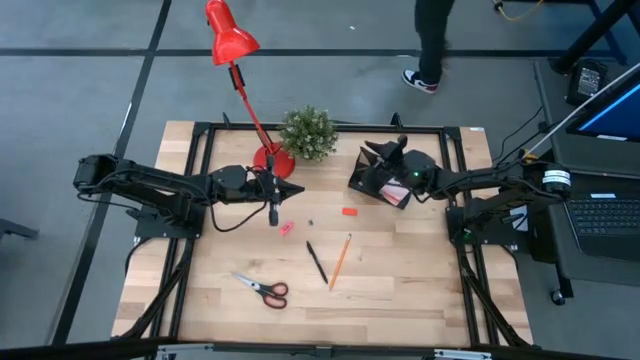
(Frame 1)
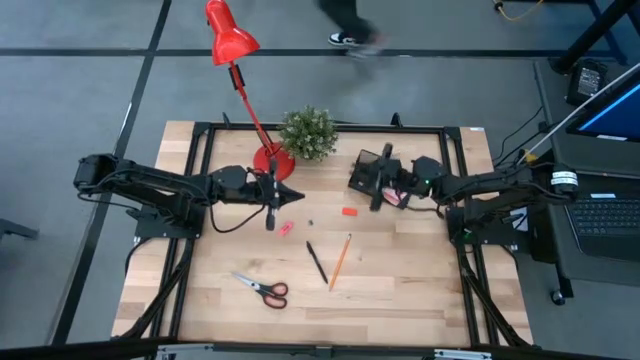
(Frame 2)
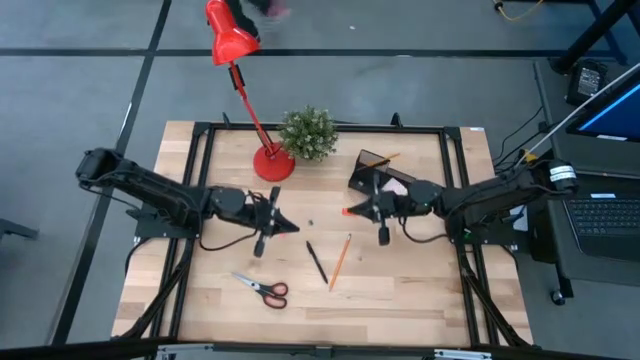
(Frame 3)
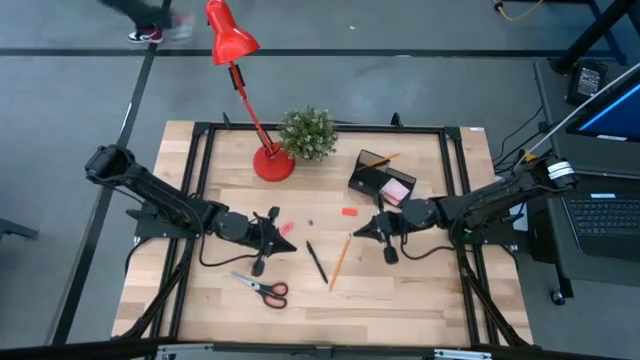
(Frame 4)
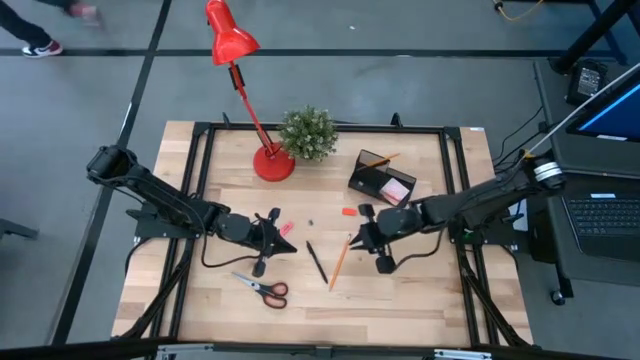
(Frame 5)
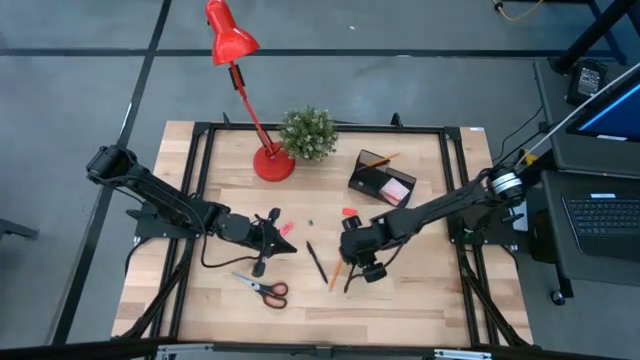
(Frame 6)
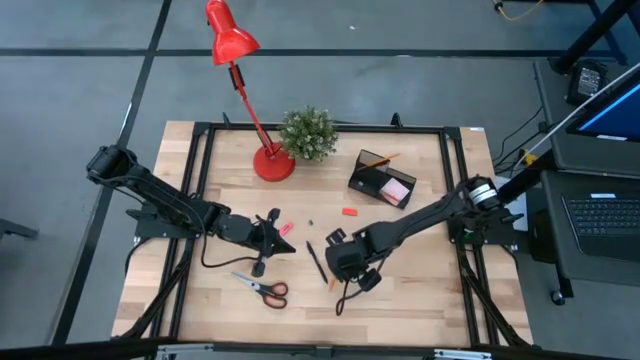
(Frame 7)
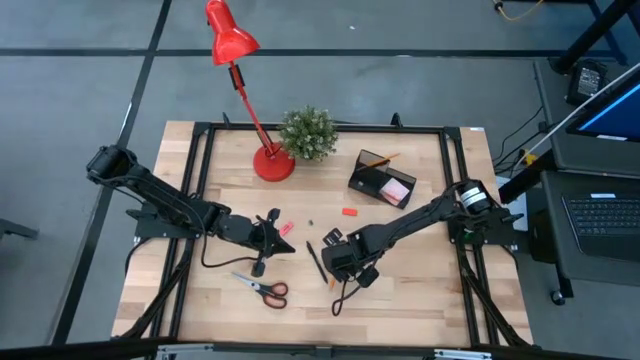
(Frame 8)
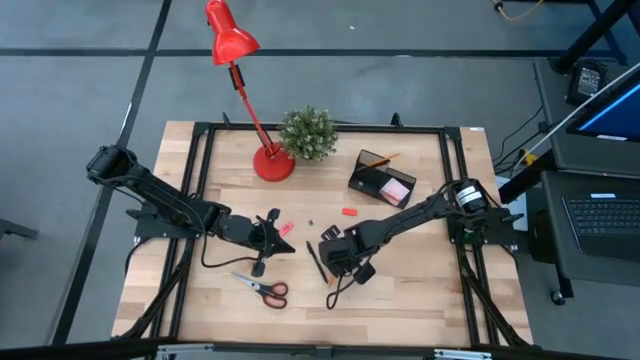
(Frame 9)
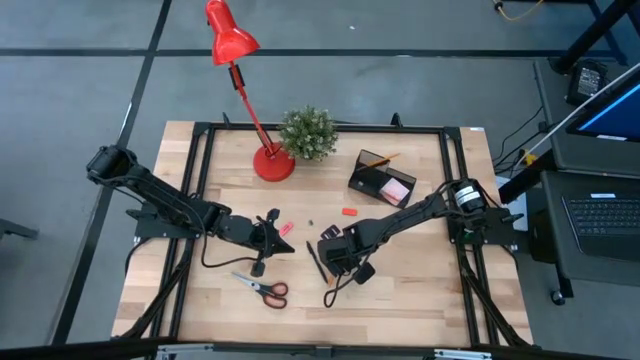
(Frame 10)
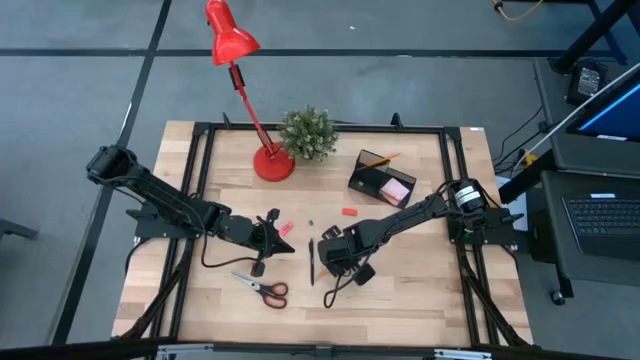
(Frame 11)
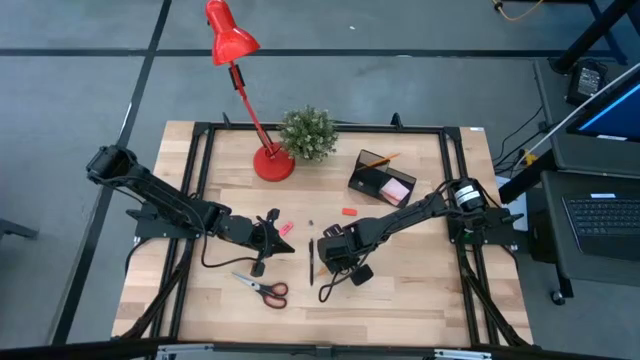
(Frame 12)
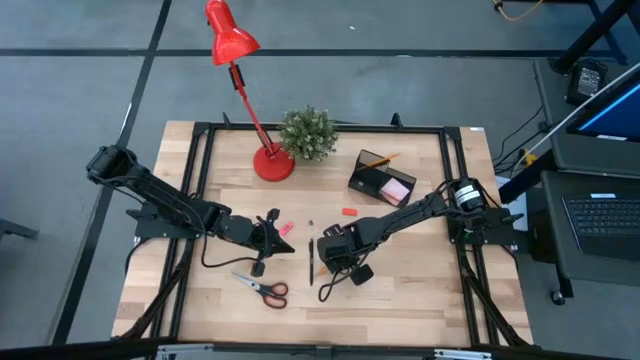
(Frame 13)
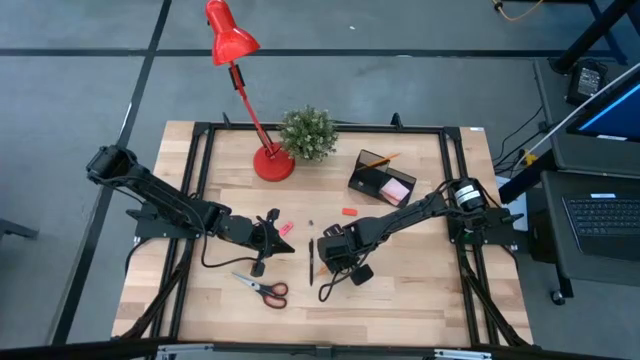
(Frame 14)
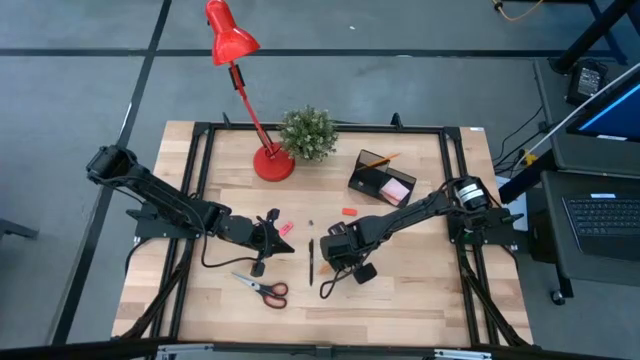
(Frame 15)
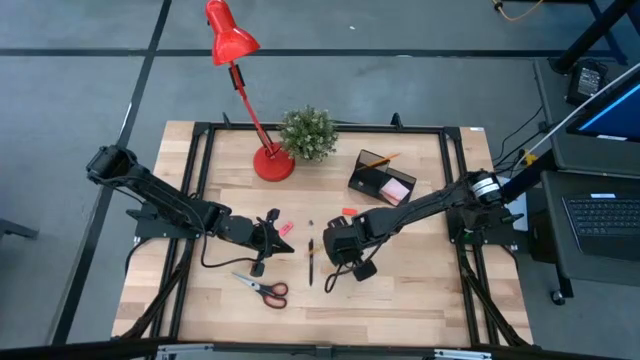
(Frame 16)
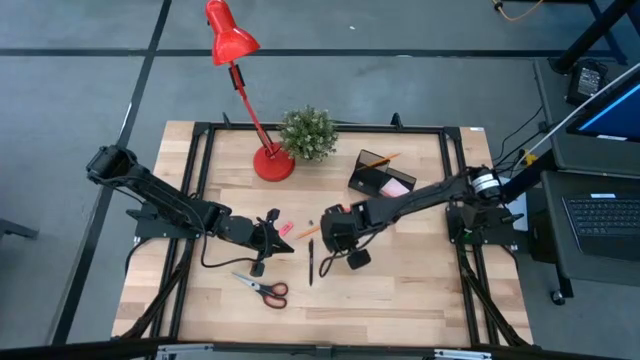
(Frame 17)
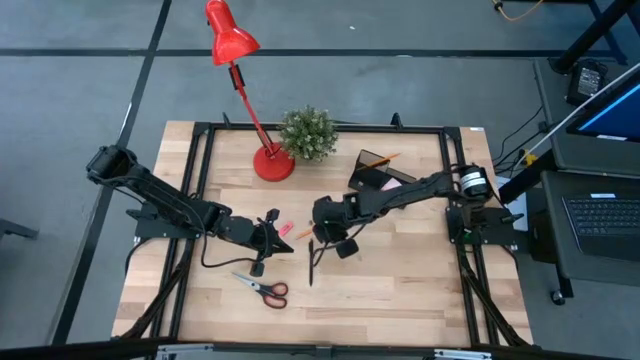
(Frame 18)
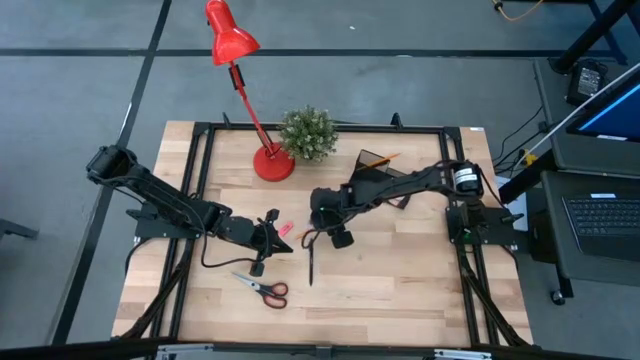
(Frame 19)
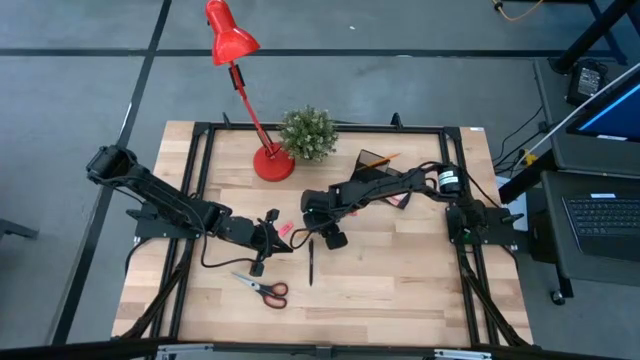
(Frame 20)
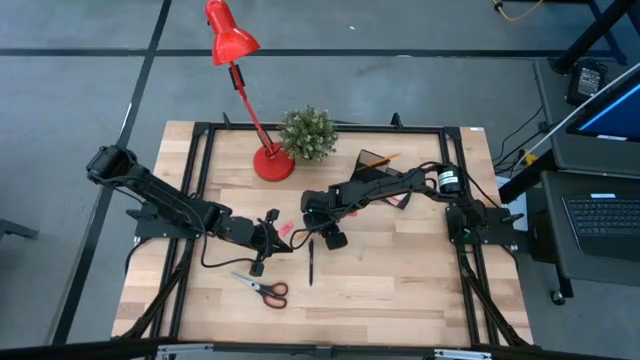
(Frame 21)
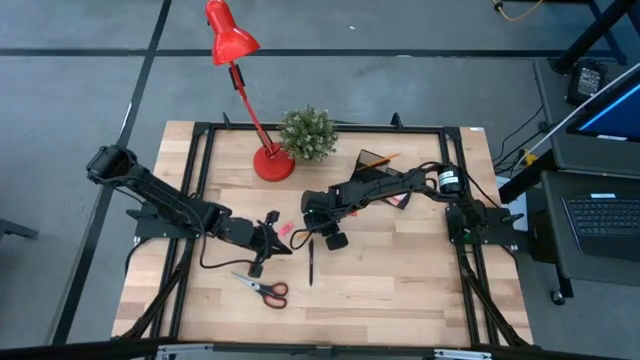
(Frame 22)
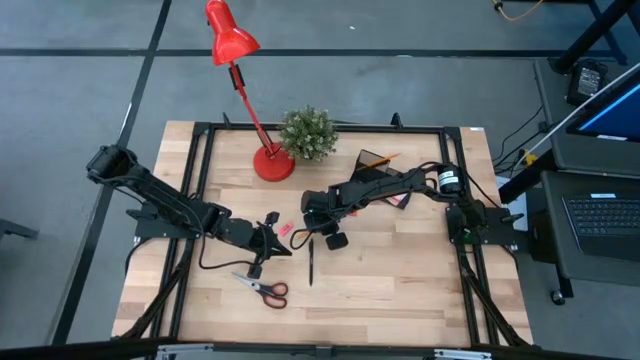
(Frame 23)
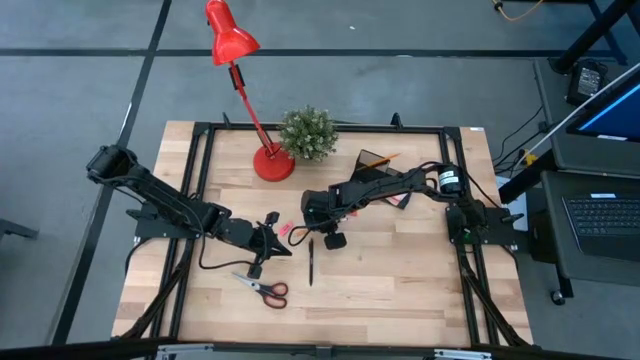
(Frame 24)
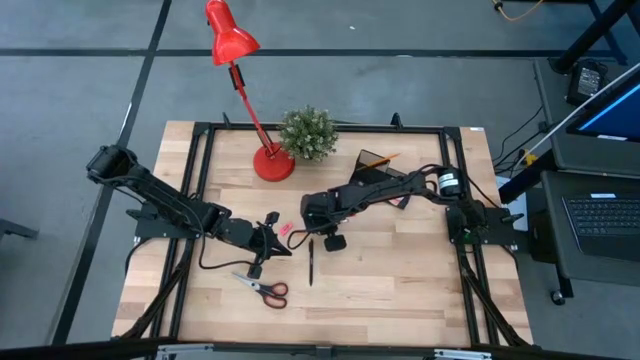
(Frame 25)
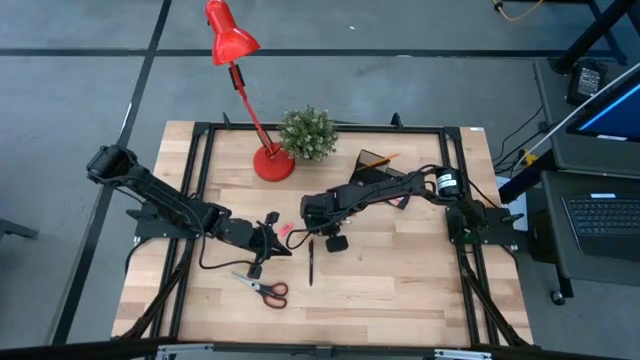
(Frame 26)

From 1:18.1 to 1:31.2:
Task: Pick and place office supplies into organizer
Put the orange pencil into the black desk organizer

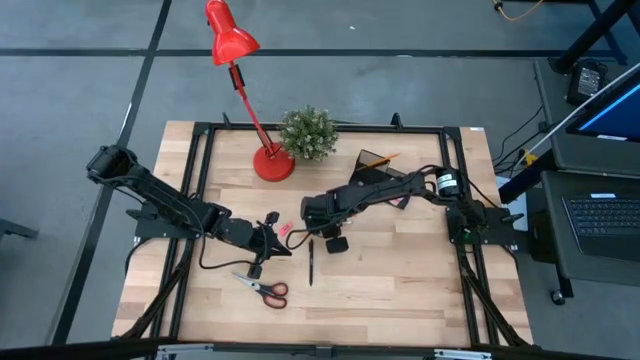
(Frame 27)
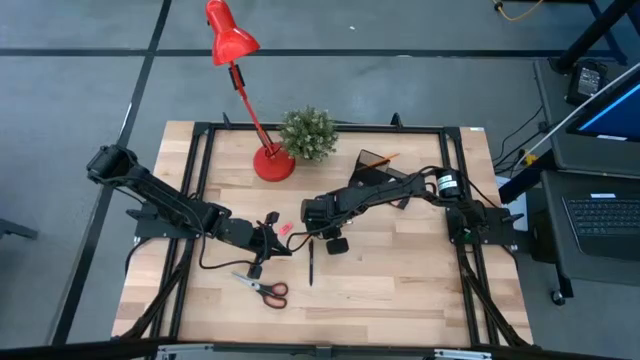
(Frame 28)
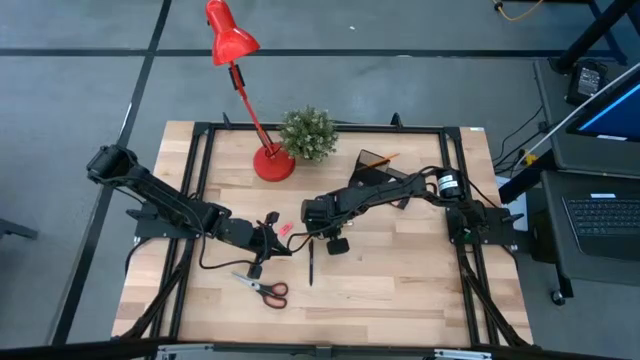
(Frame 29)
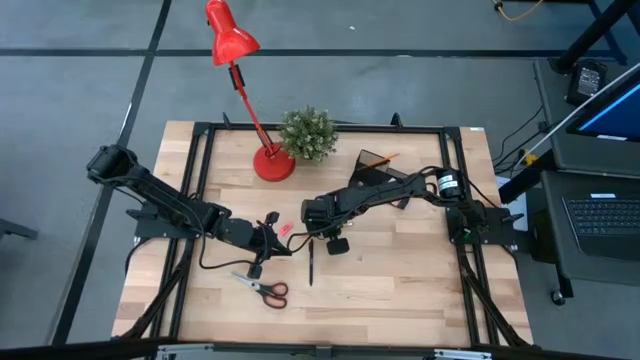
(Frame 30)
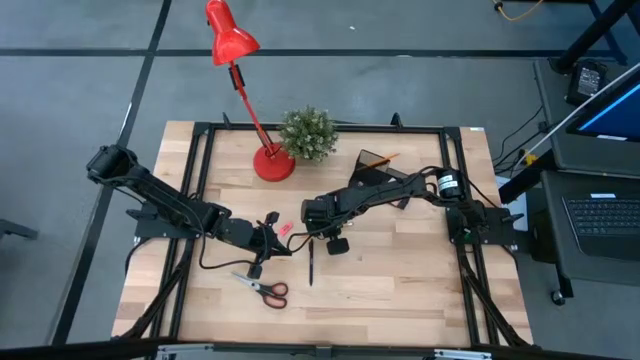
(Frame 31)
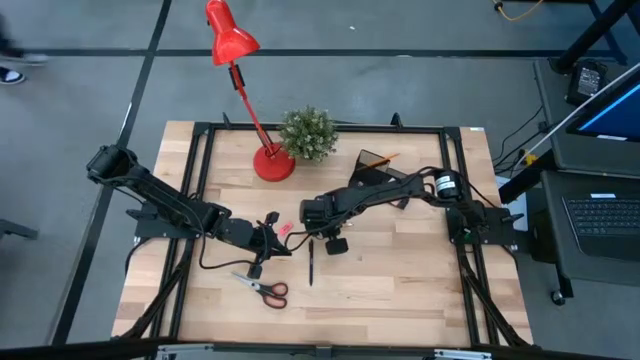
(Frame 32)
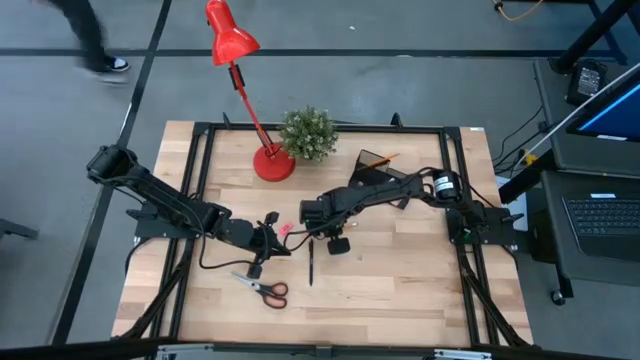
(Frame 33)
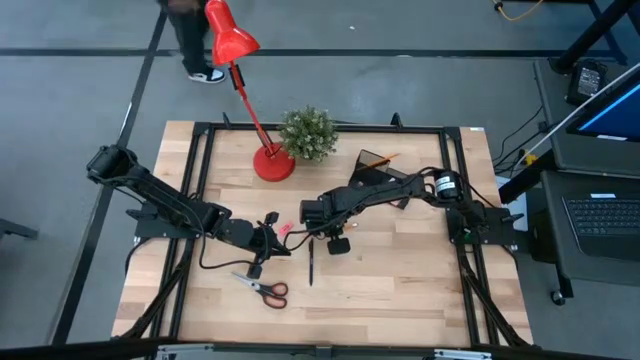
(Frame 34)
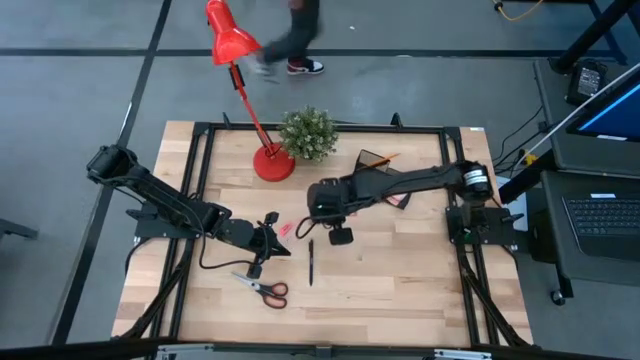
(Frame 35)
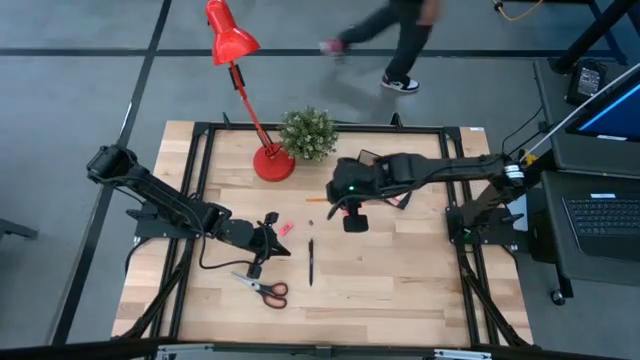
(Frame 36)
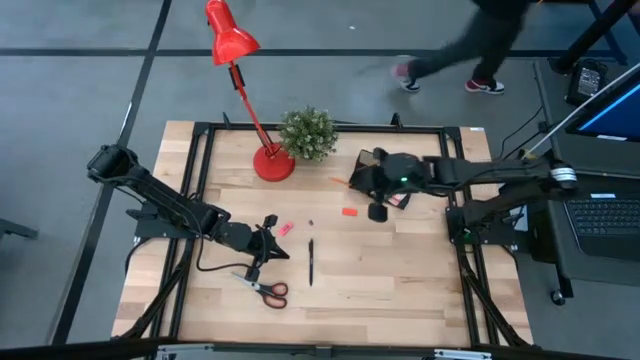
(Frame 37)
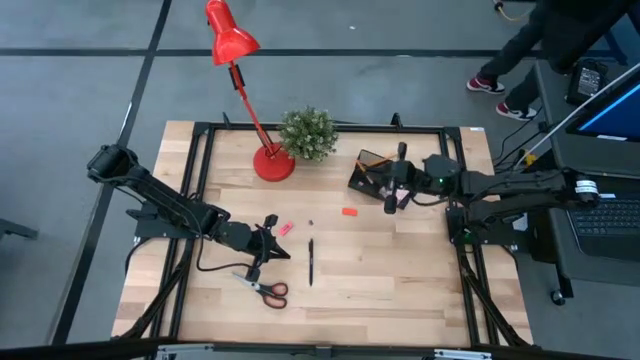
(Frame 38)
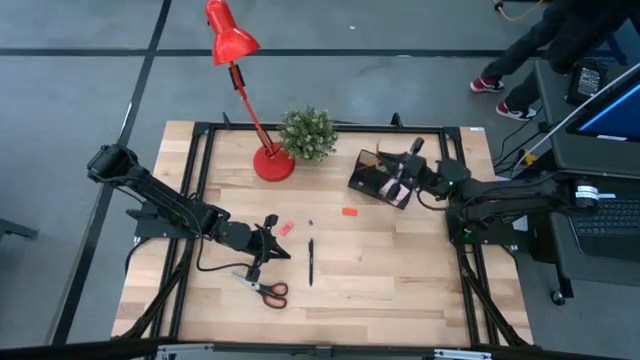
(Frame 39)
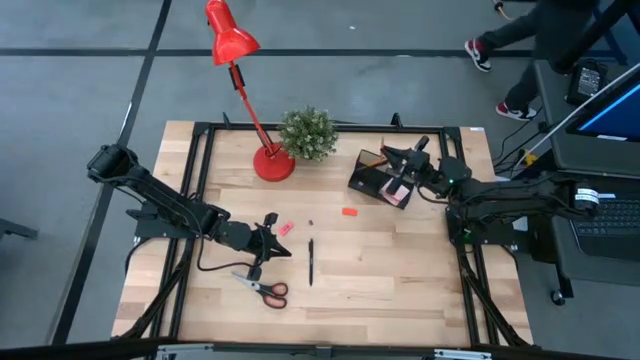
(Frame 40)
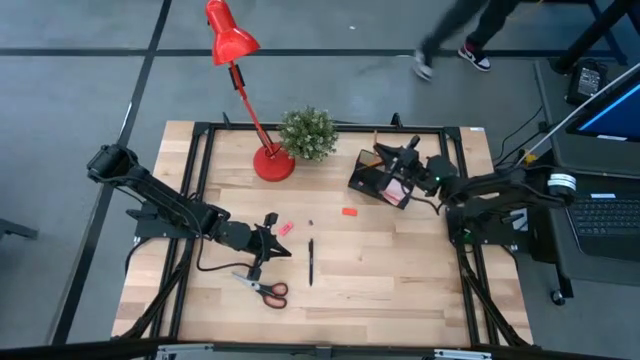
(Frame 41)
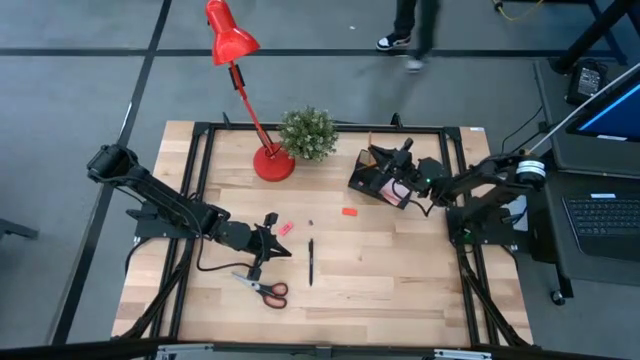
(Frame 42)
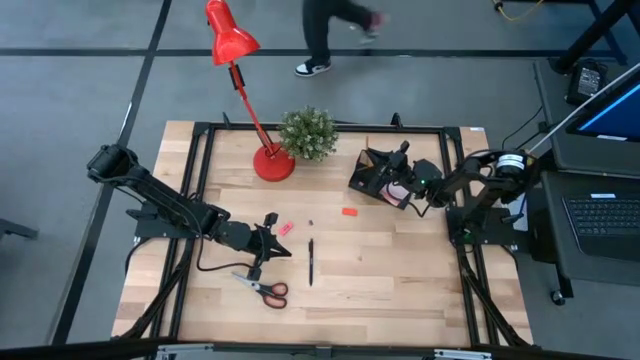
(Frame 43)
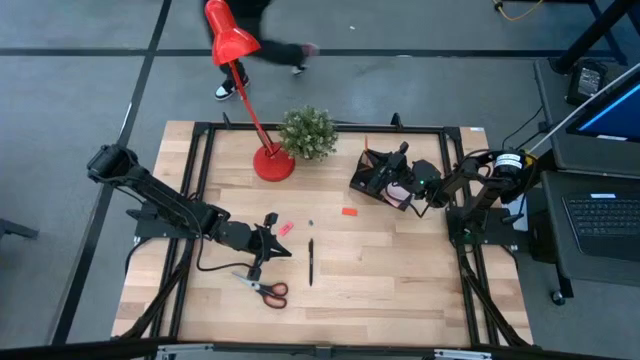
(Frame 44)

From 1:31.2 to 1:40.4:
Put the orange pencil into the black desk organizer

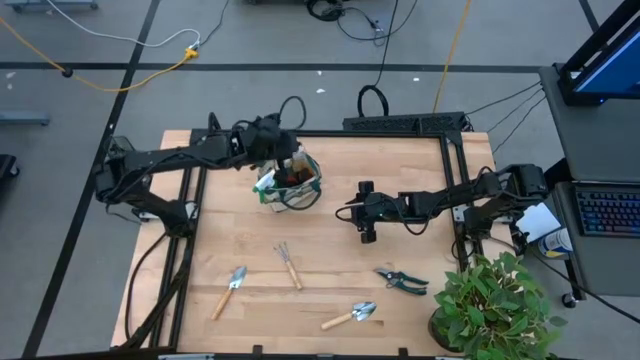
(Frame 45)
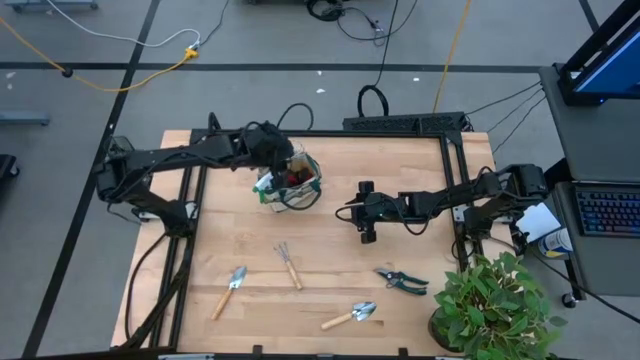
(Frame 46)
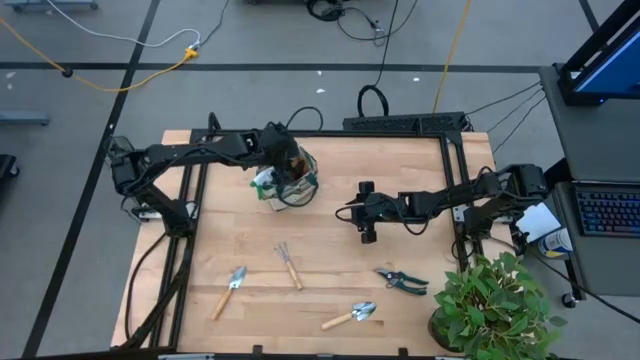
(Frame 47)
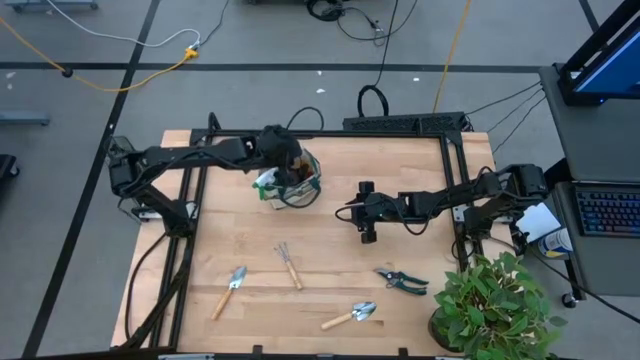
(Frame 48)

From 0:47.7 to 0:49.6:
Task: Pick & Place Garden tools in Gardening bag
Put the top hand rake into the gardening bag
